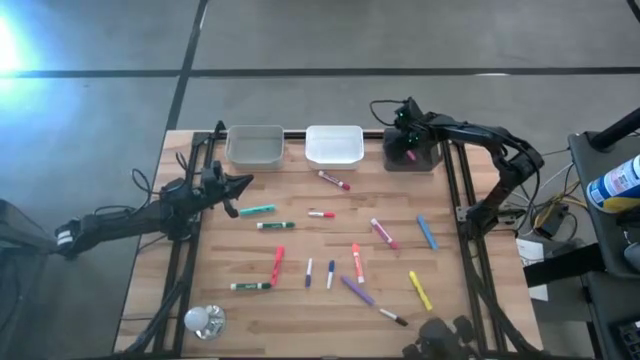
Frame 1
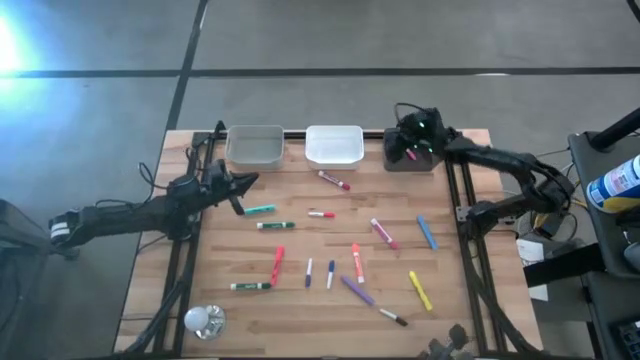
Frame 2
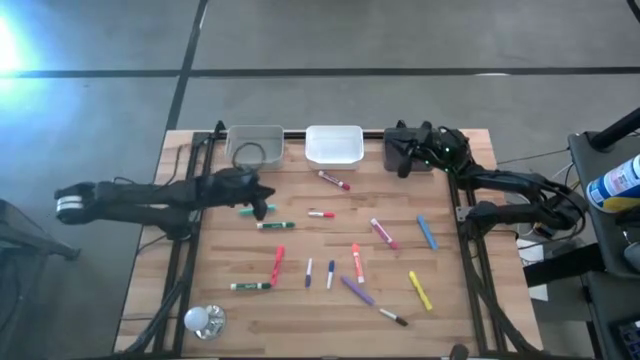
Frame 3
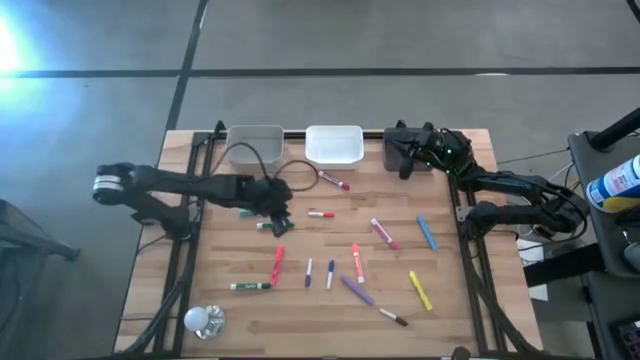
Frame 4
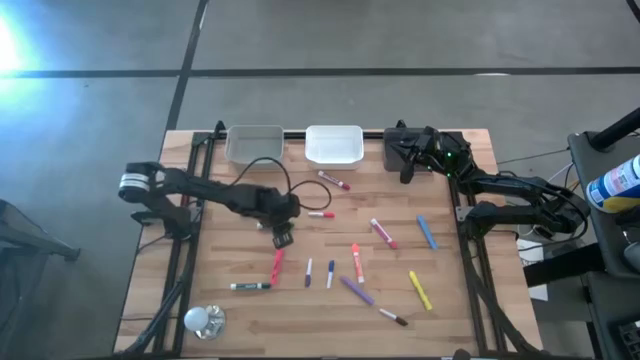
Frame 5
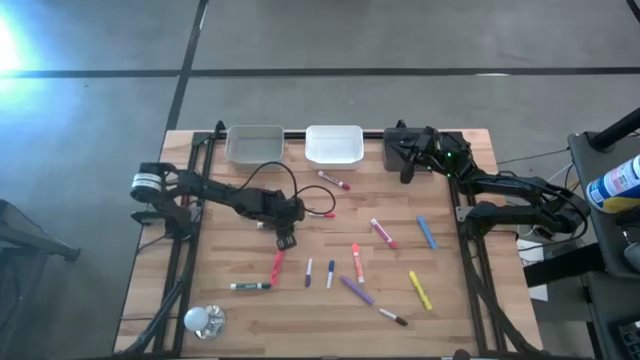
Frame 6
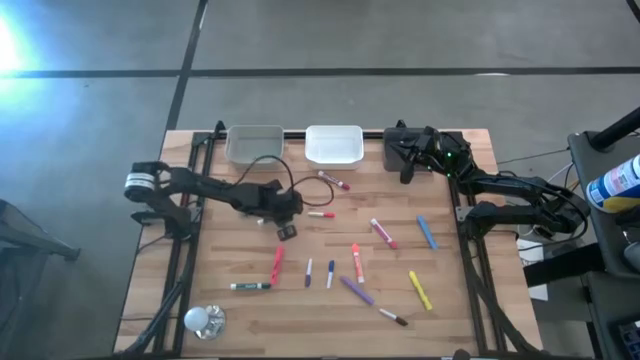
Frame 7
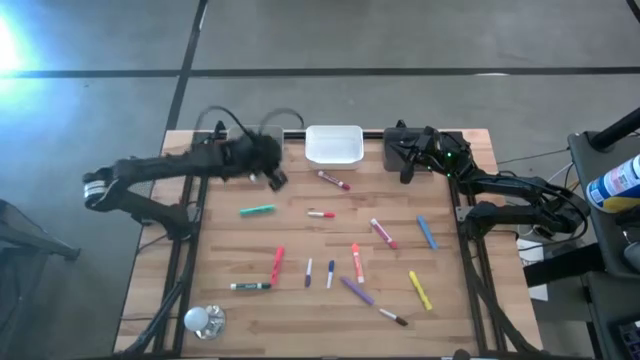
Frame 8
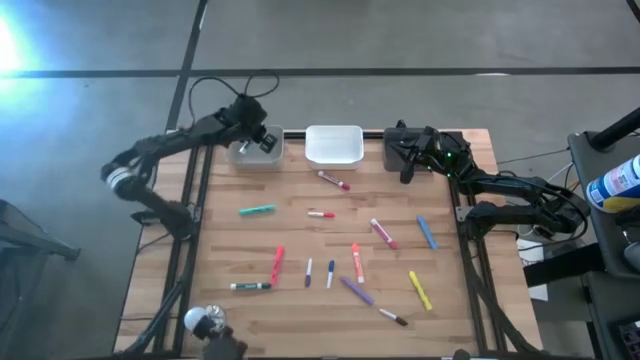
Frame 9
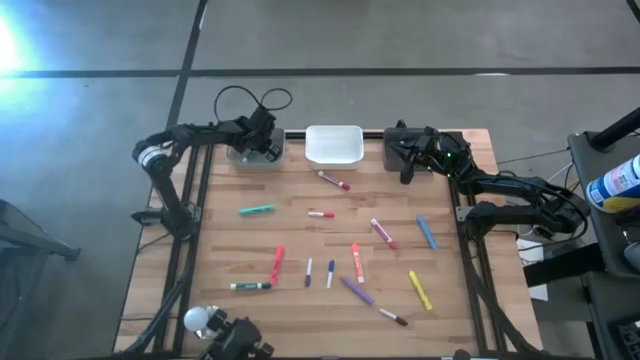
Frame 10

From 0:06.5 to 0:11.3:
Task: Pick & Place Markers
Put the green marker pen into the gray bin

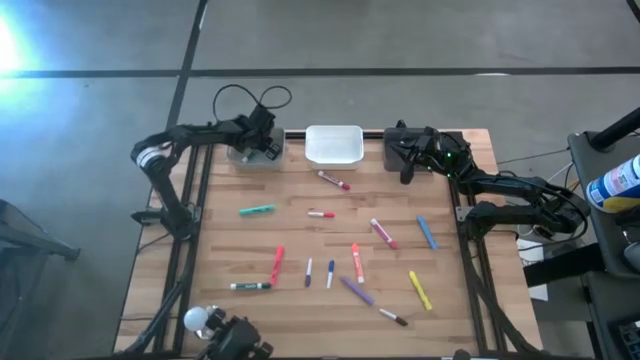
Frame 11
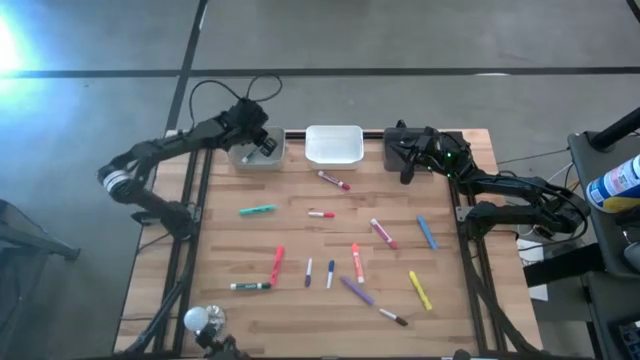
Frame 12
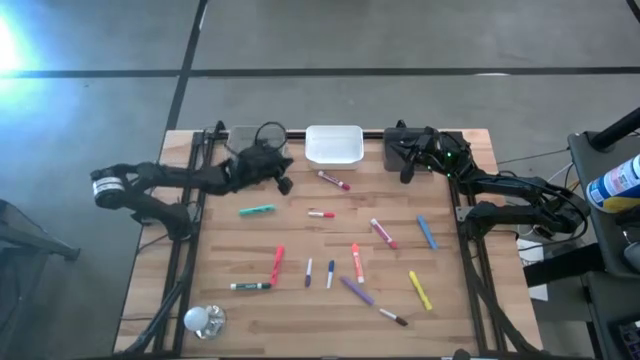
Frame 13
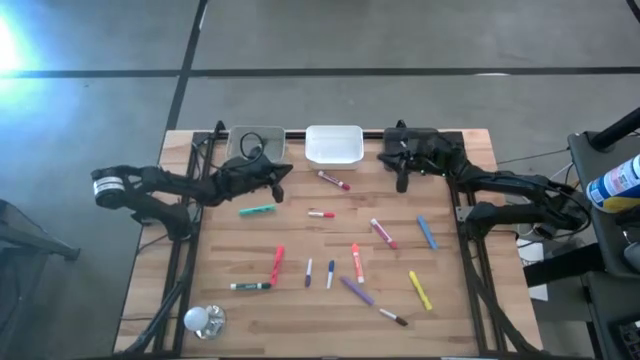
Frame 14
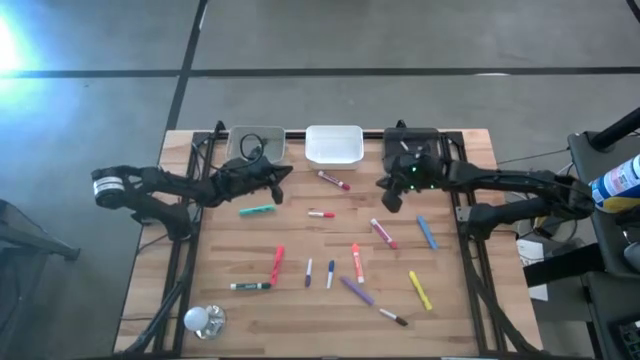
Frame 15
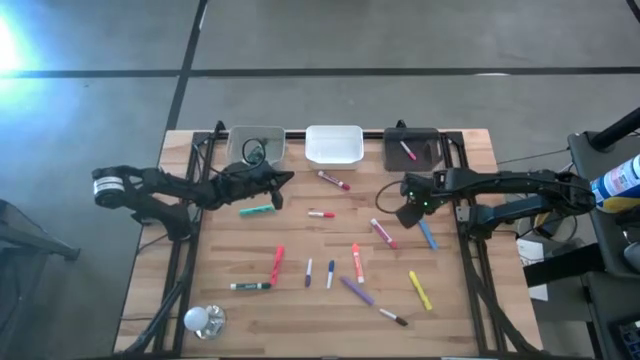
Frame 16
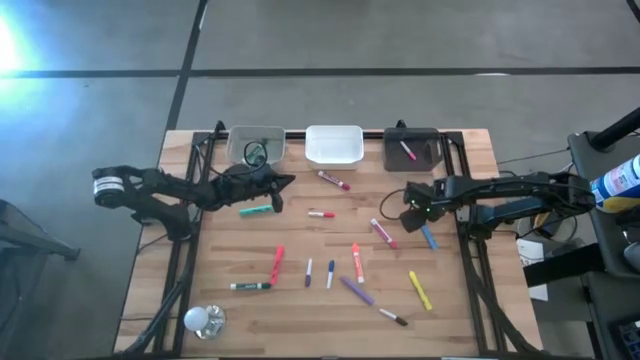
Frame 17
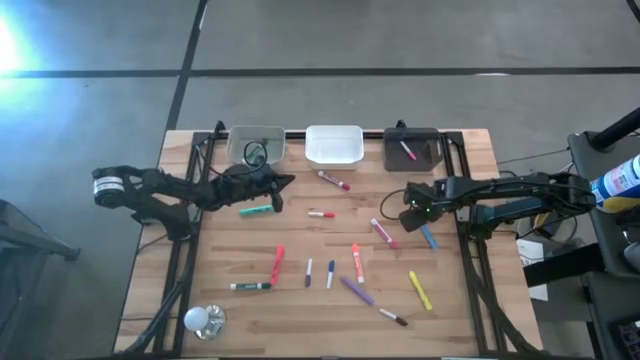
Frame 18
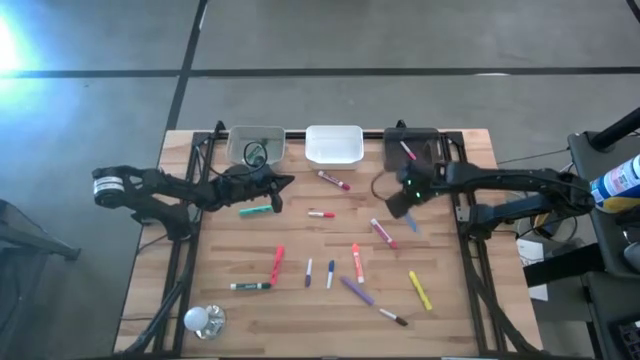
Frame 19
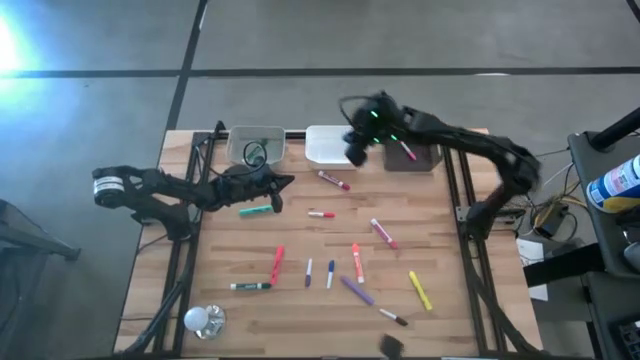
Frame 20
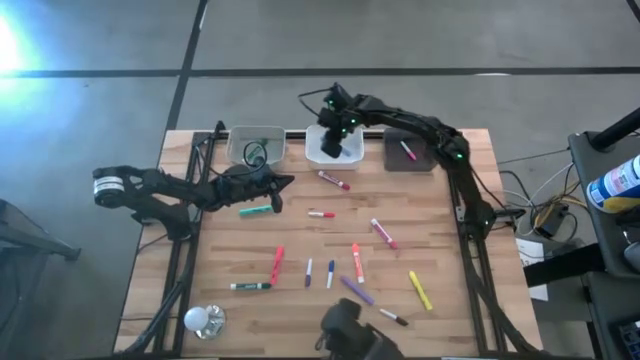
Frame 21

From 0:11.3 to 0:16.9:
Put the blue highlighter pen into the white bin

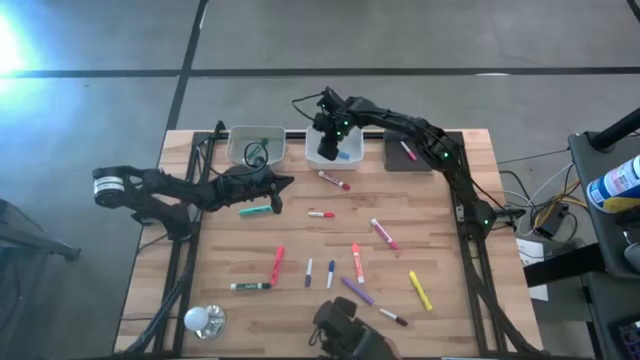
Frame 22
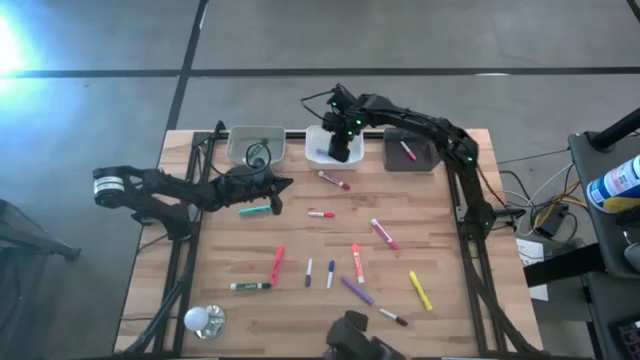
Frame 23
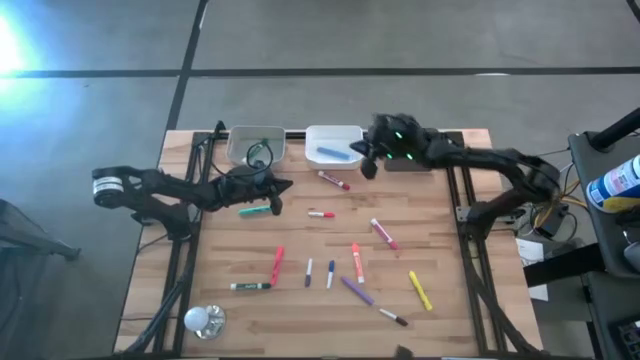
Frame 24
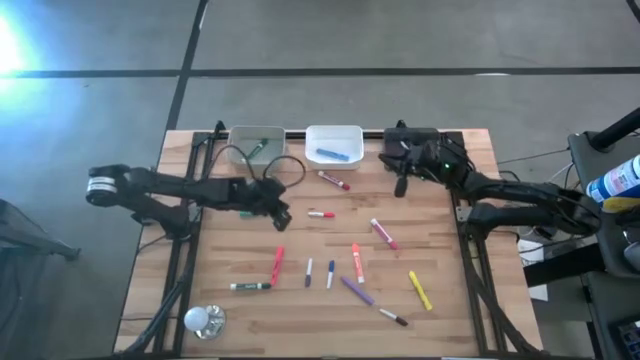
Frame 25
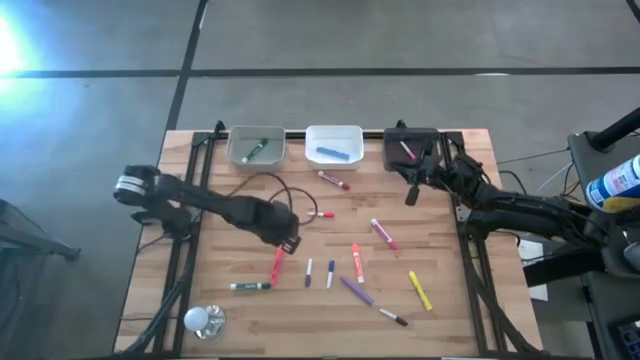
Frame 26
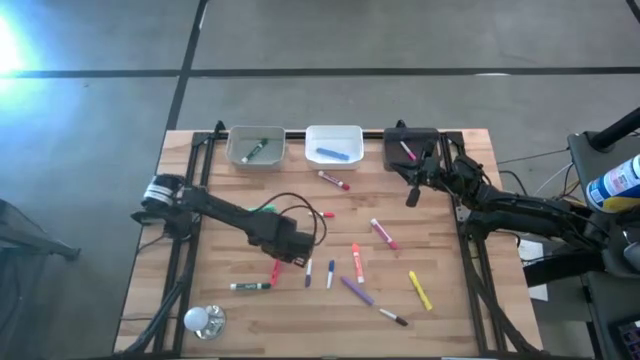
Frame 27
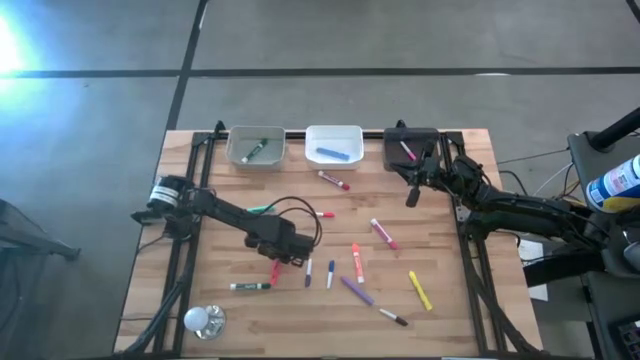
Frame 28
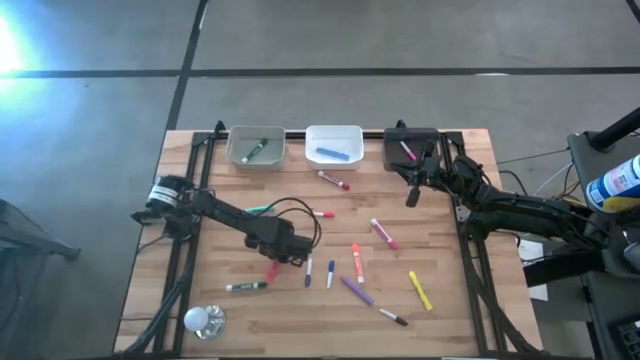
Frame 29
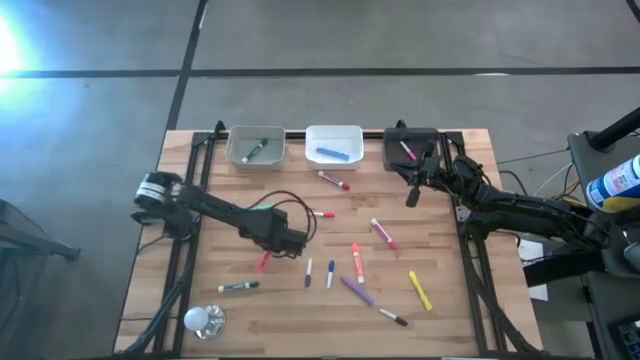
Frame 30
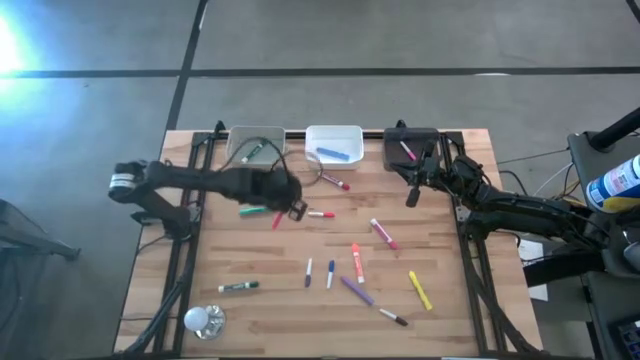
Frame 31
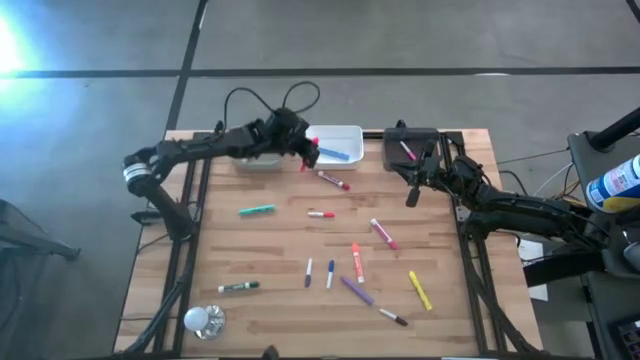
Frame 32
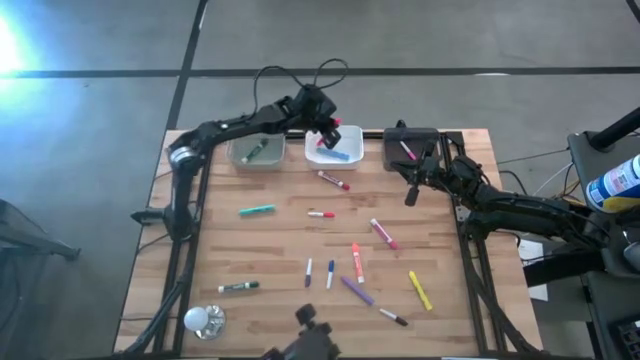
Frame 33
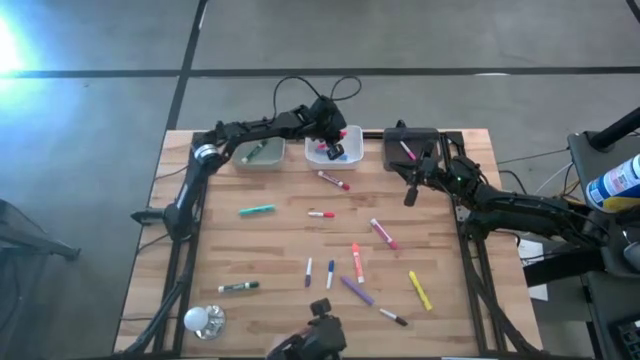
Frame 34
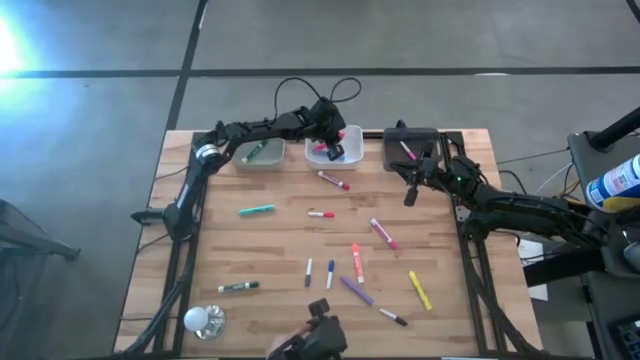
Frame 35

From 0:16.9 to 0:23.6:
Put the pink highlighter into the white bin

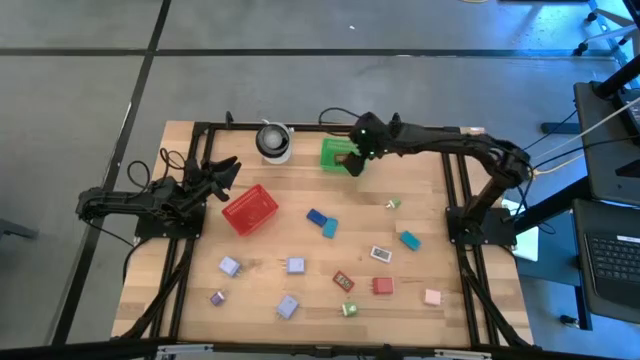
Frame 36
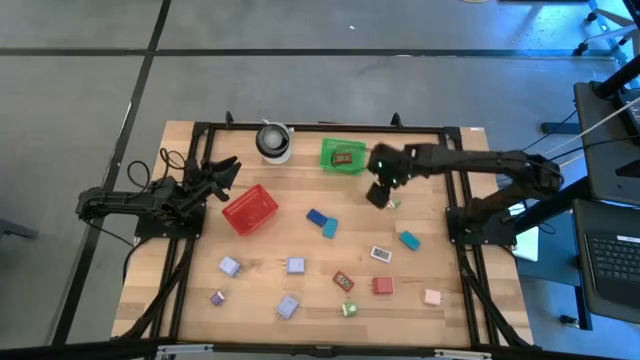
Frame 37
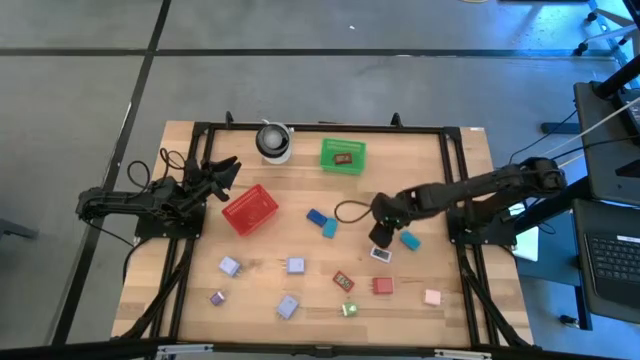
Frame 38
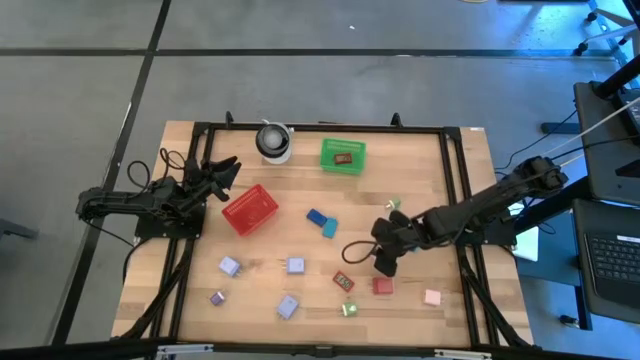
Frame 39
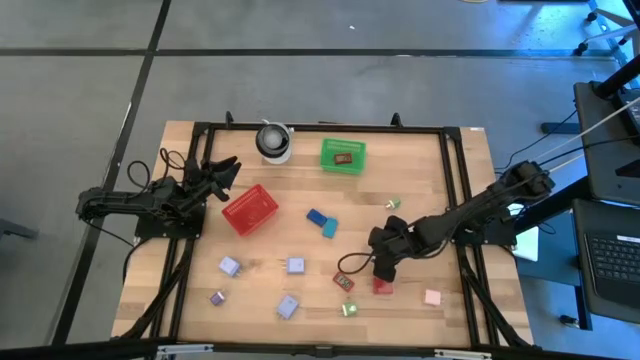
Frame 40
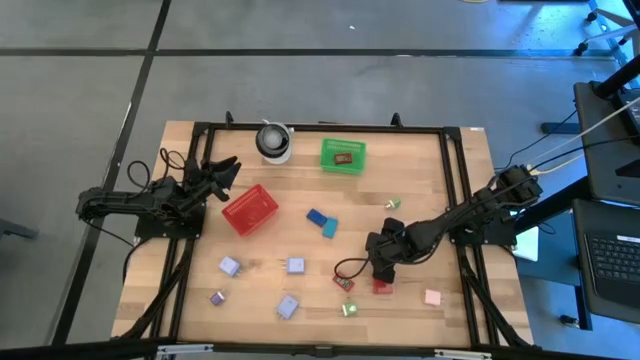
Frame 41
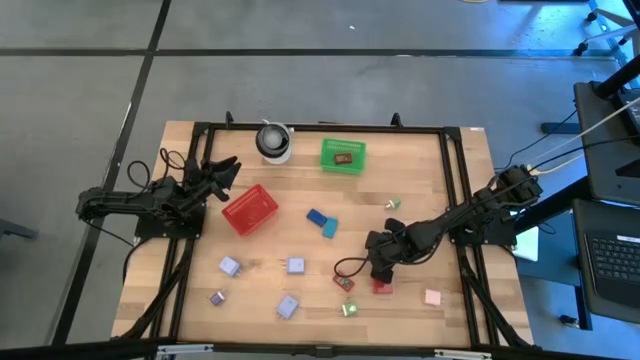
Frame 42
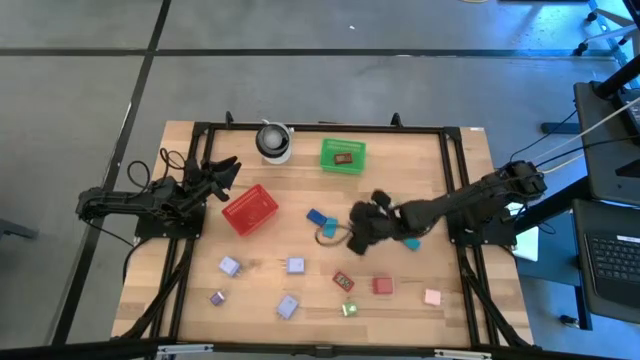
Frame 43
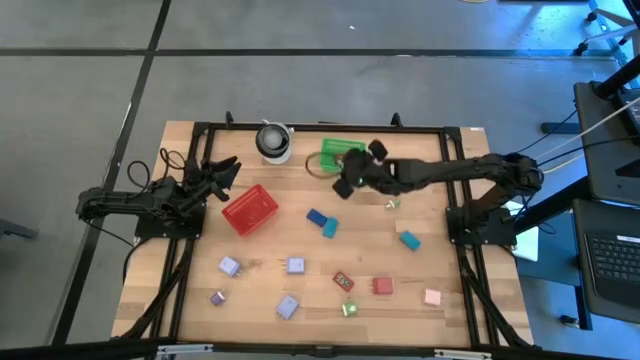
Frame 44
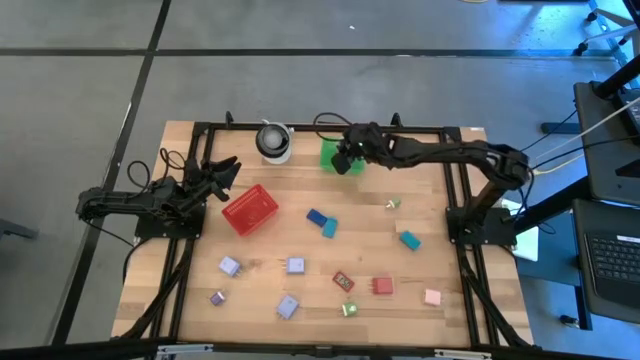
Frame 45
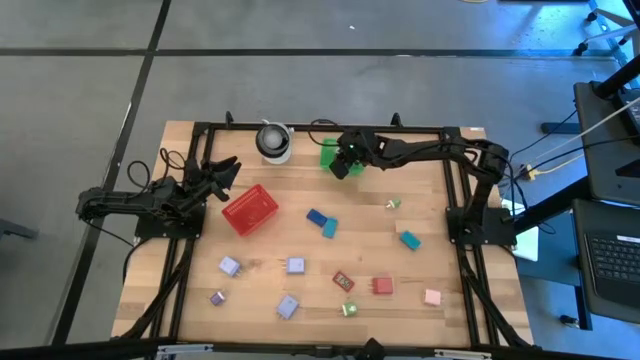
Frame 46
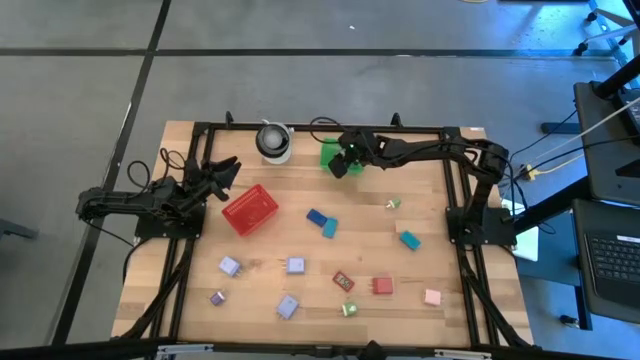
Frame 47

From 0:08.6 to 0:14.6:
Task: Pick & Place Office items
Put the white digital clock into the green bin
